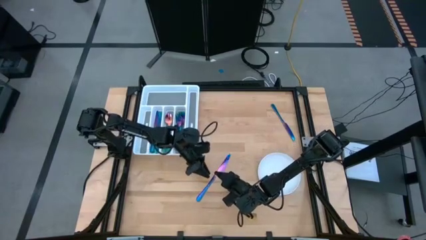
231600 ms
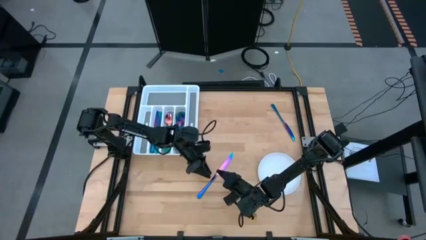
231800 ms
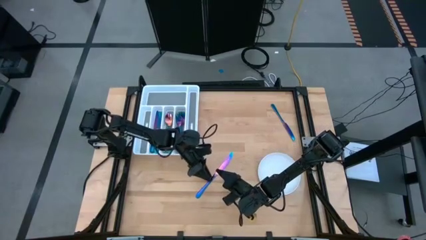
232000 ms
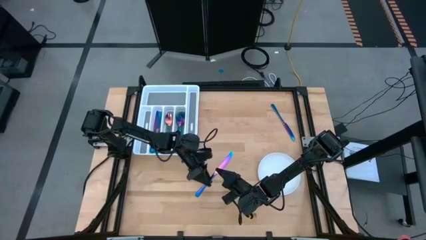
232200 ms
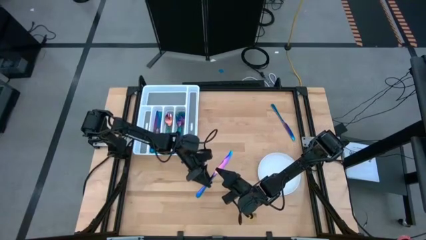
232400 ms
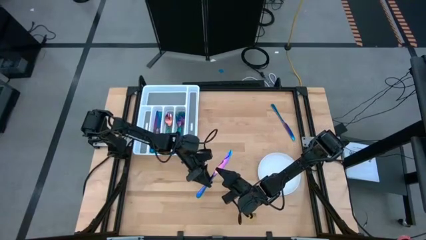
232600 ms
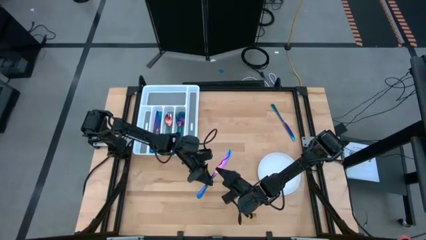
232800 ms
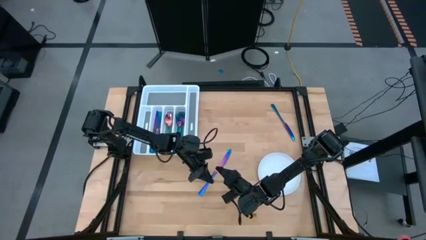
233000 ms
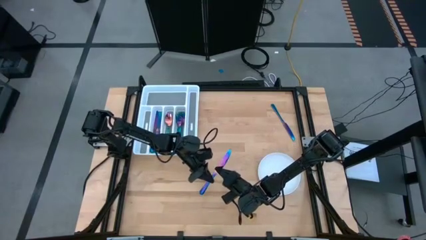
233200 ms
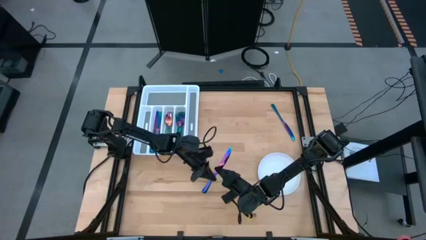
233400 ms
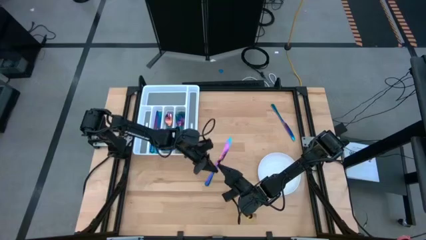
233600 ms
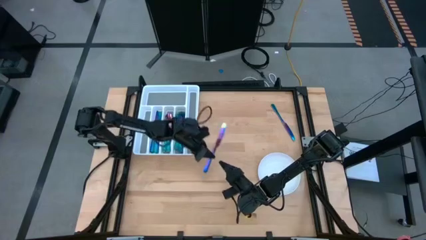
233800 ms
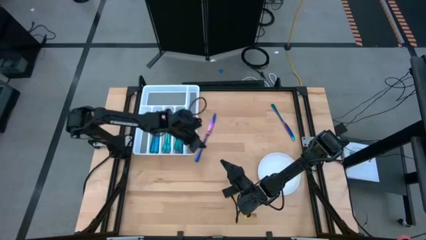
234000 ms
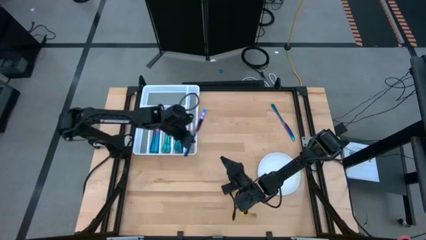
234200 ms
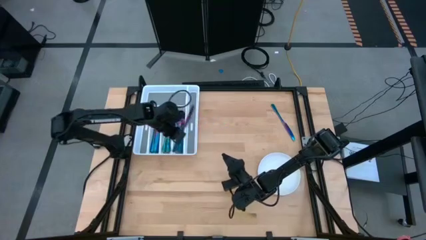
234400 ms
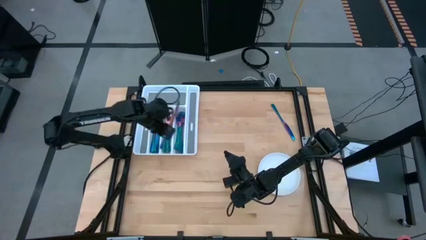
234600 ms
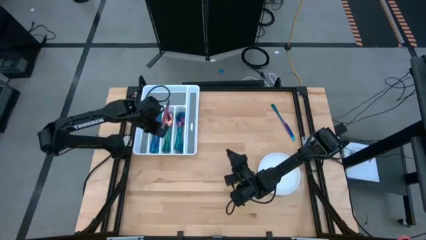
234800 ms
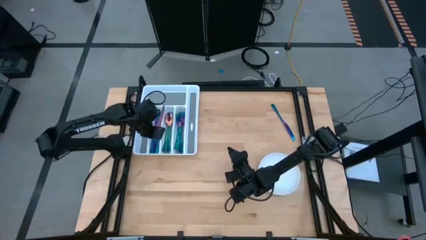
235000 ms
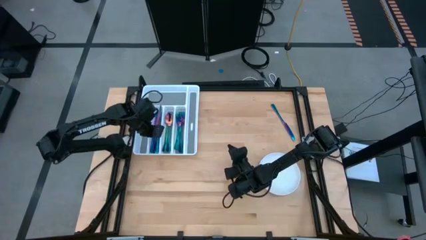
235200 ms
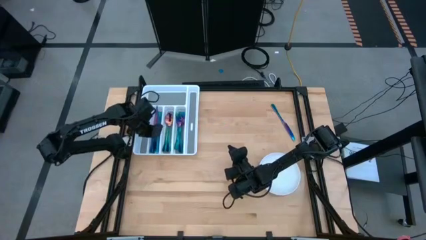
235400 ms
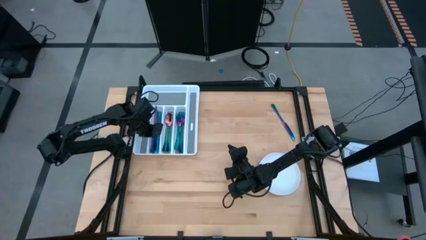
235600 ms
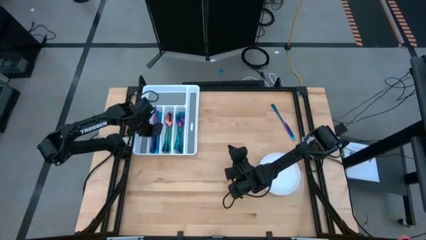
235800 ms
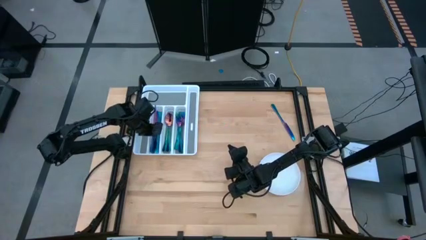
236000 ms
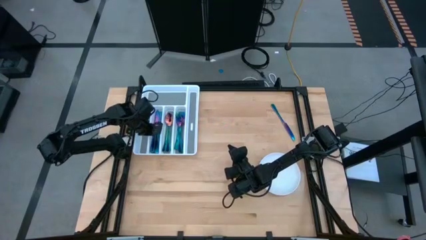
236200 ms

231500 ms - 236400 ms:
Task: Sort silverware
Put the iridescent knife into the white silverware tray

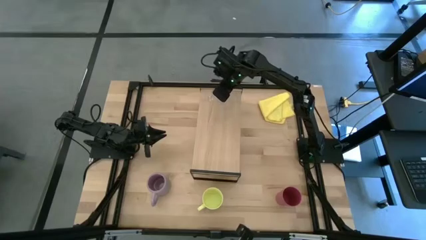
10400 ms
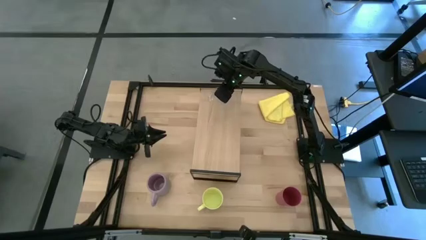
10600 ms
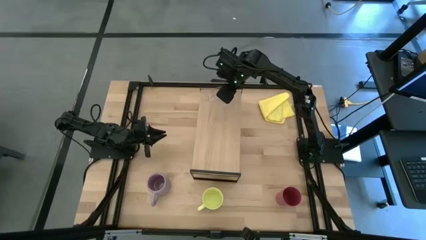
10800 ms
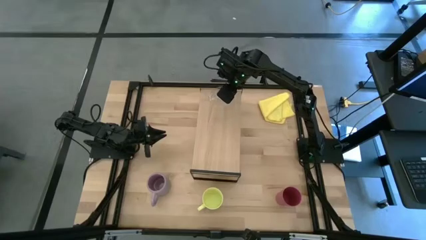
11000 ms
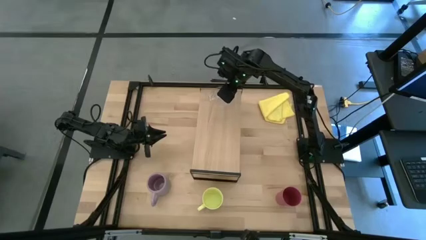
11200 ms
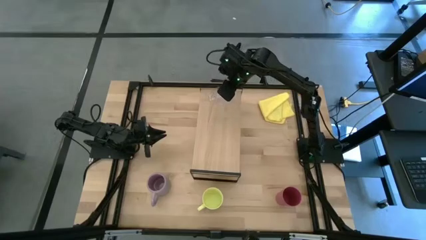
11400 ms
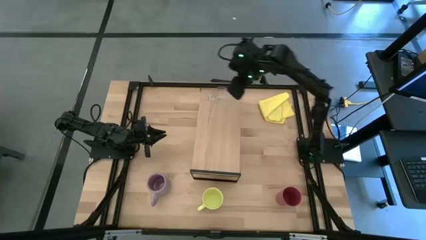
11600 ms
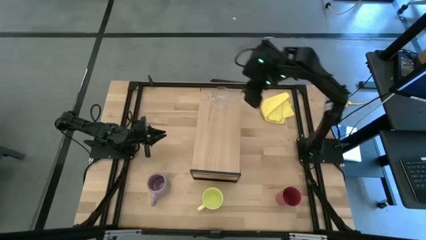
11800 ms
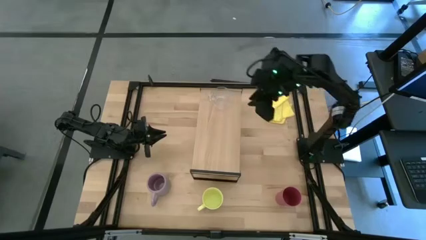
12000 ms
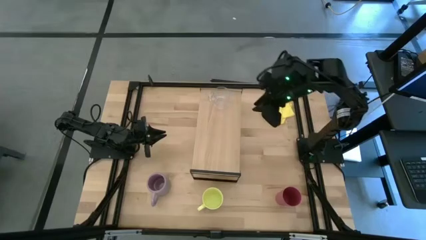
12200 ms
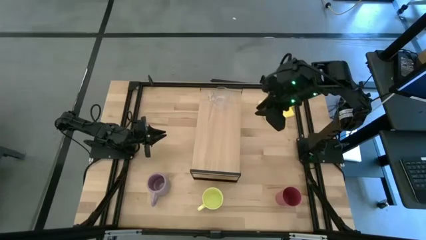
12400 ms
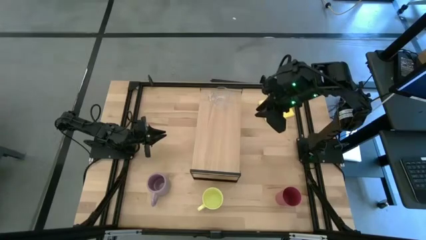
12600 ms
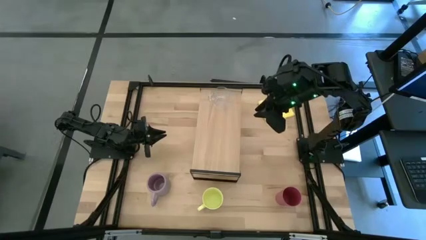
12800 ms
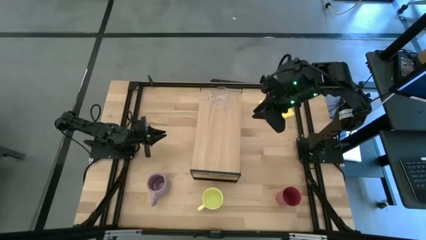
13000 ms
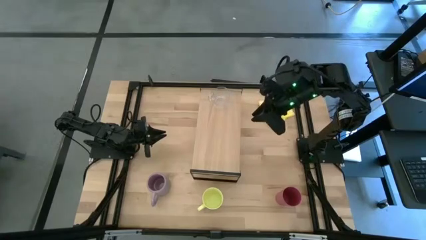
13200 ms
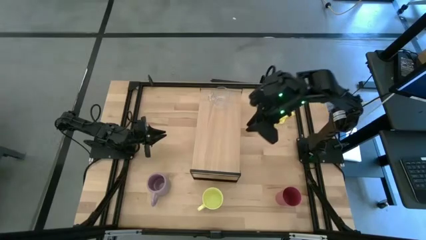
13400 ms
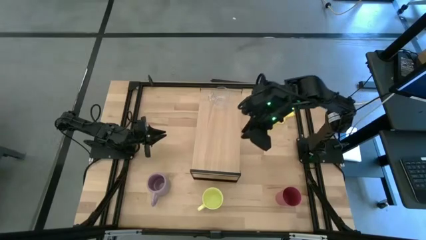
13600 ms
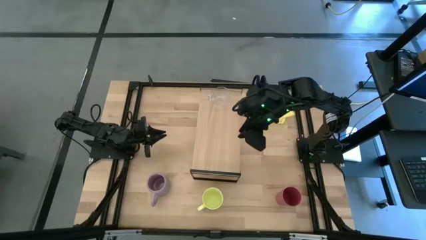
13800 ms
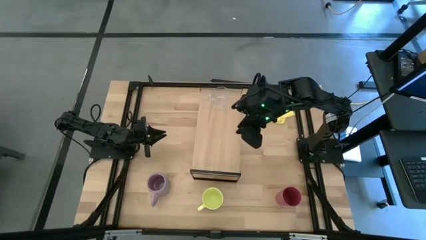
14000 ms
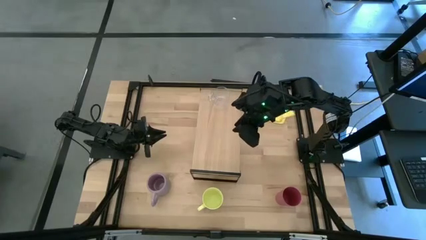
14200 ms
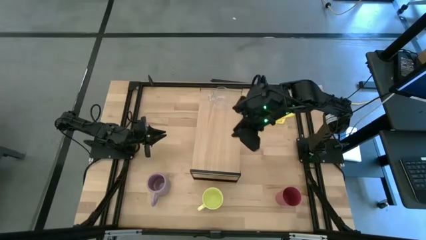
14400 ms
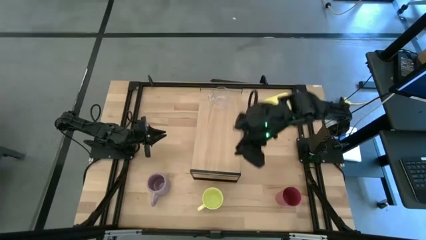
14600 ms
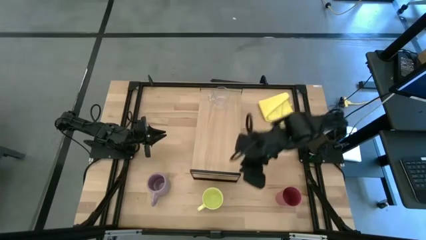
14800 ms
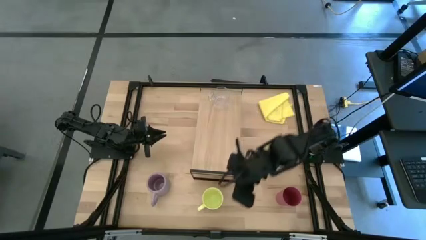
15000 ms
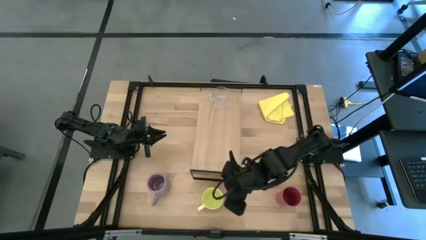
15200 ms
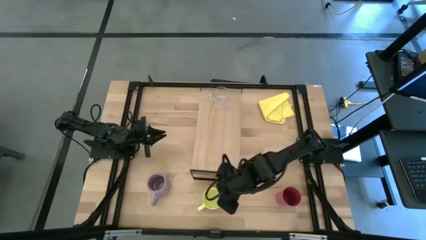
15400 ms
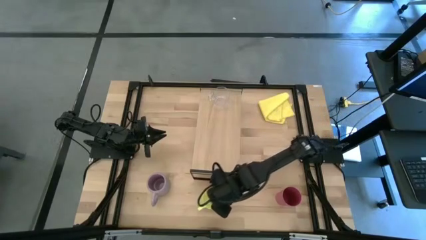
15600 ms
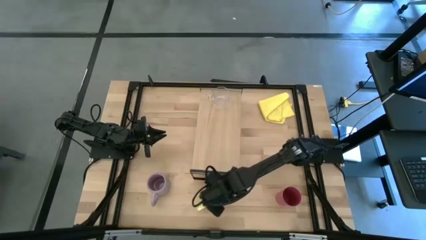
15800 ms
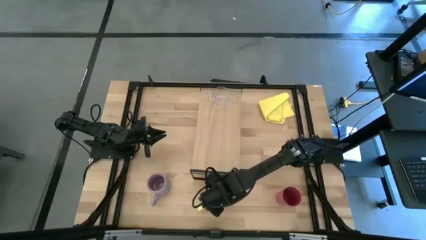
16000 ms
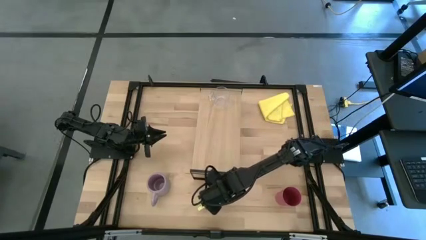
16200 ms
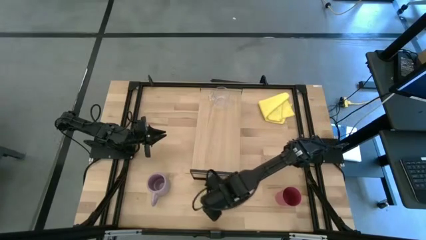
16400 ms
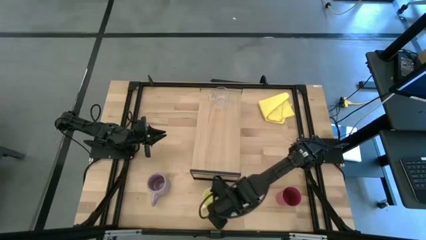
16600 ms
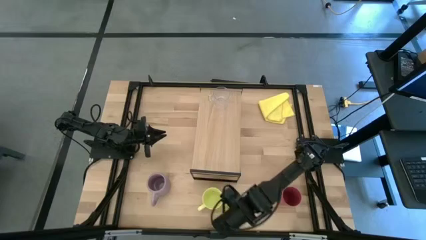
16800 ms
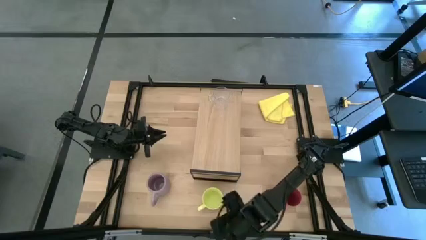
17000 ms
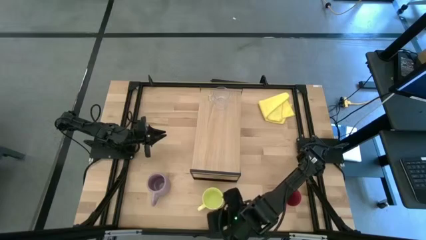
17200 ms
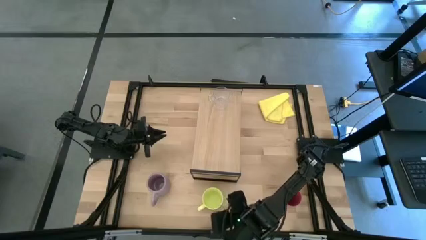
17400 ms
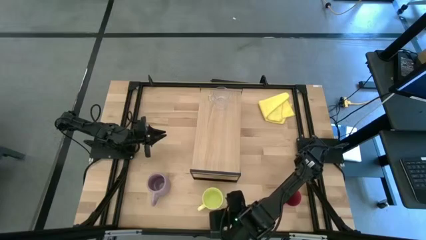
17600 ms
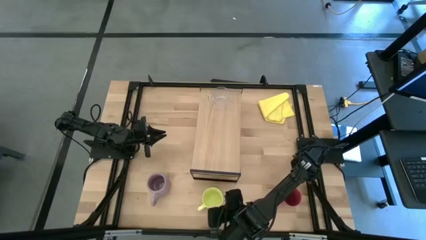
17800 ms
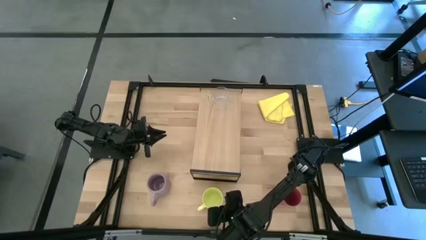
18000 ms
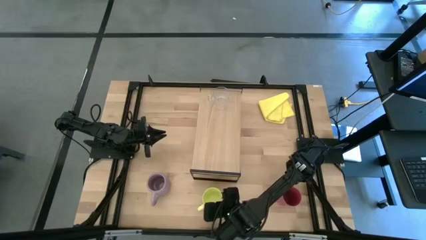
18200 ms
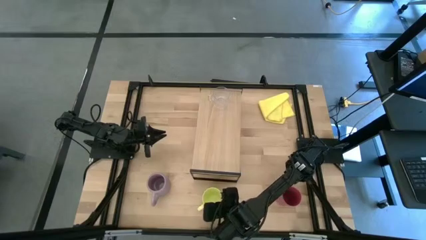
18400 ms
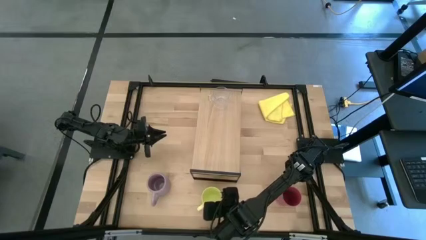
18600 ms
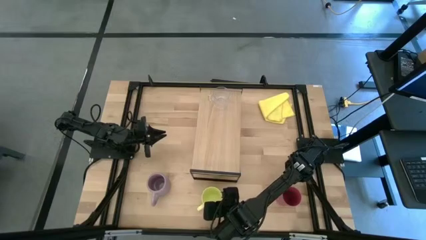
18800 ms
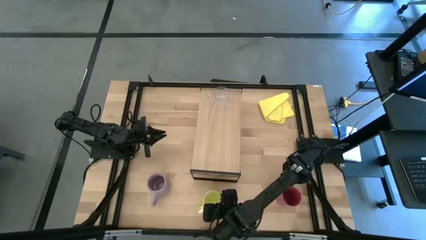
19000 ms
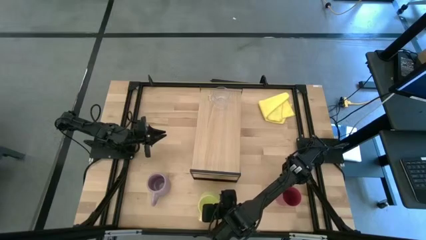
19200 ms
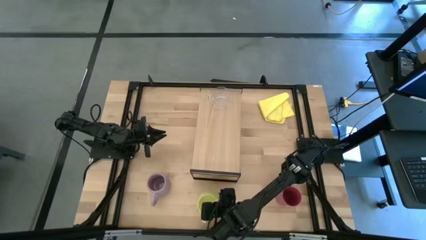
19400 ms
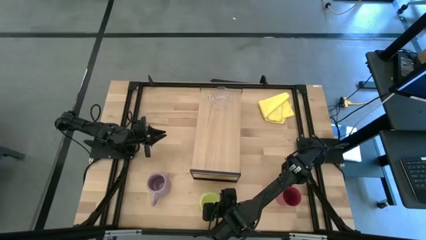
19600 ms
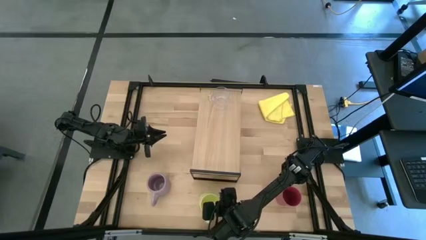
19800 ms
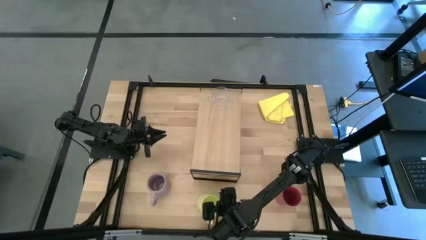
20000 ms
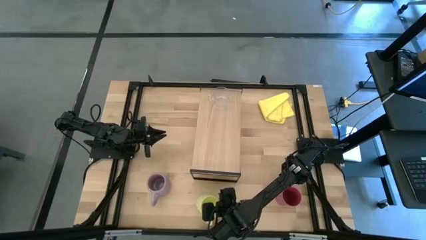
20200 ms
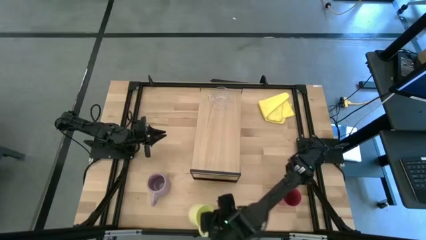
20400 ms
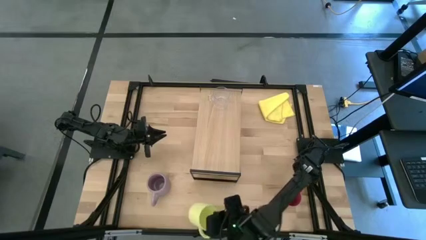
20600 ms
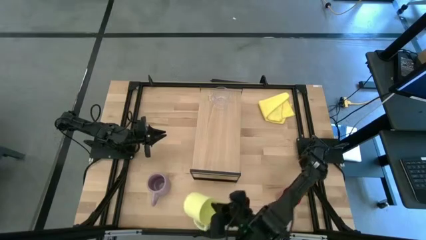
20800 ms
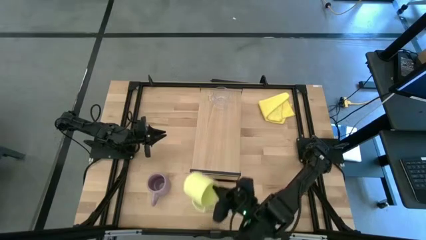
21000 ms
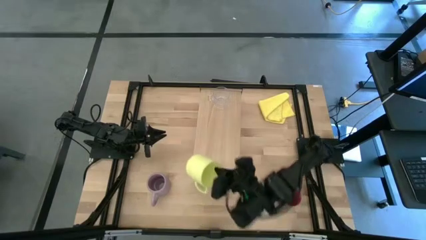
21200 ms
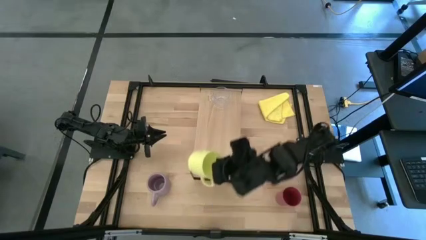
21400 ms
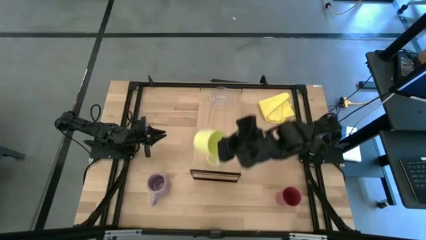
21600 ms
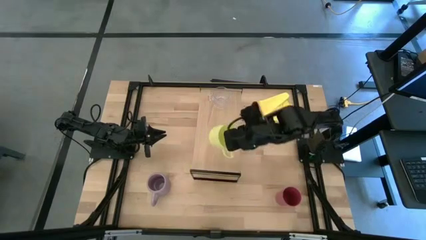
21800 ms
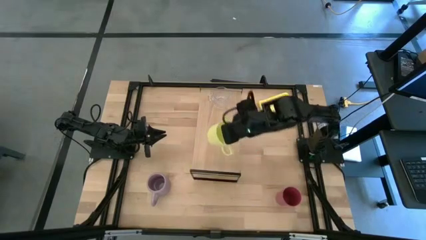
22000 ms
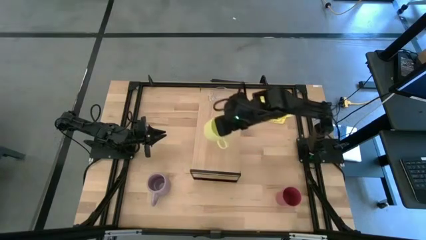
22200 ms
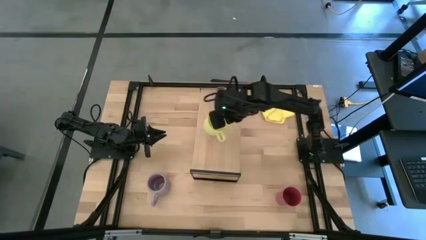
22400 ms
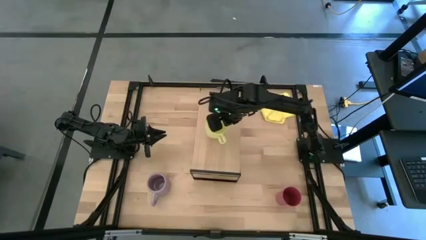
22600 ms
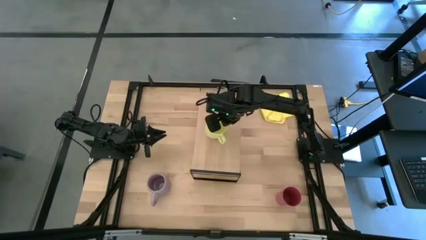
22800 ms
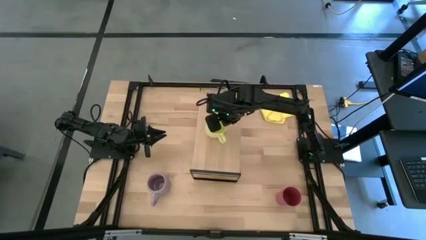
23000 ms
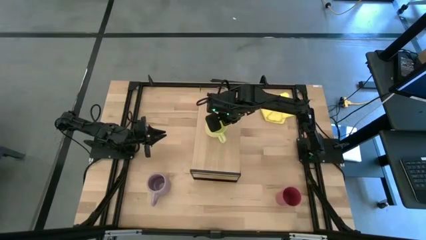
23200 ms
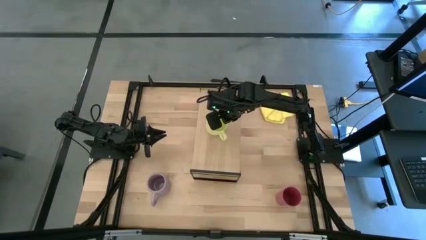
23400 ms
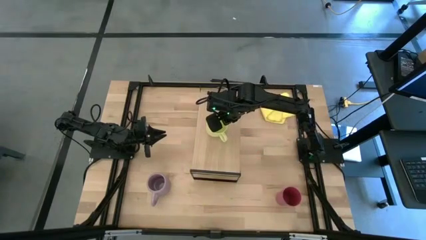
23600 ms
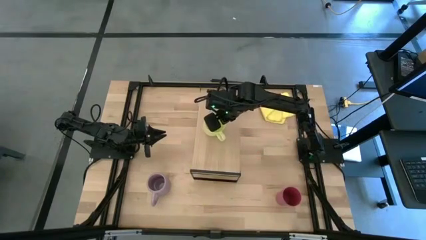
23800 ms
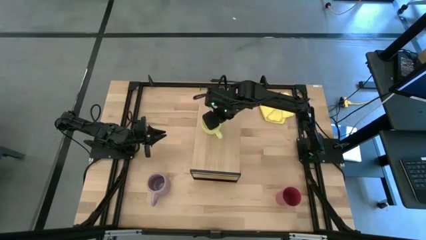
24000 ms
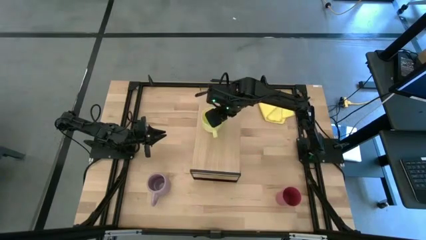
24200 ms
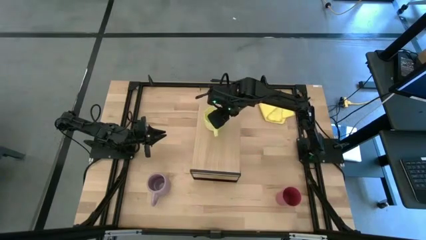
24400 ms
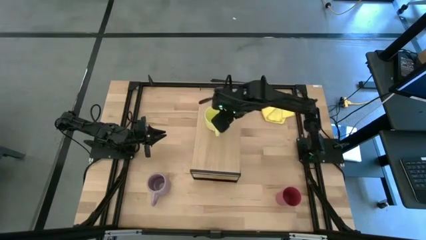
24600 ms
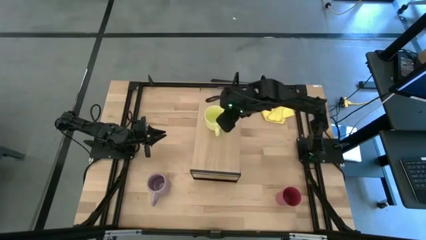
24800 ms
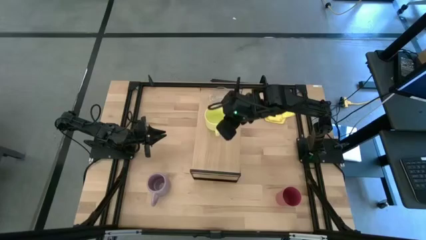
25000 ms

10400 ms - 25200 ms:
Task: Stack small to large cups/mugs on shelf
Put the yellow mug on the shelf
